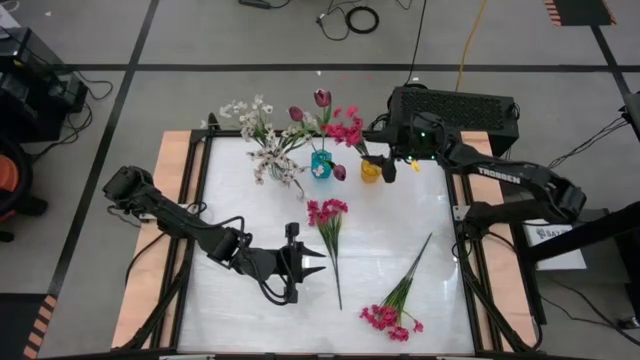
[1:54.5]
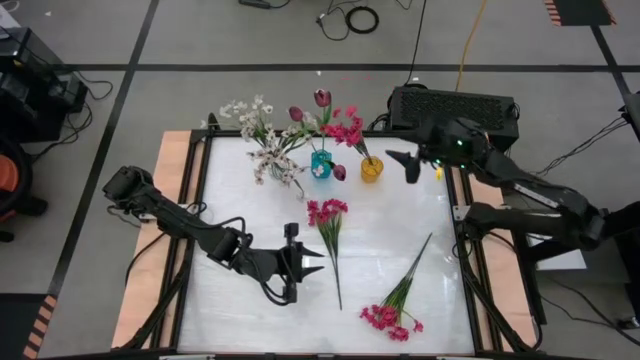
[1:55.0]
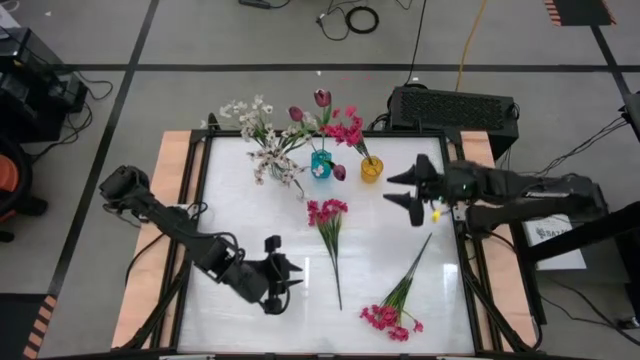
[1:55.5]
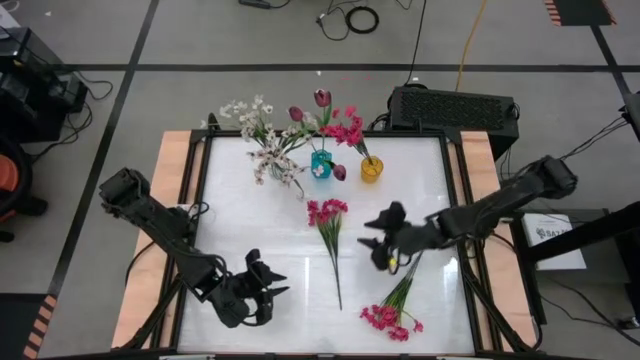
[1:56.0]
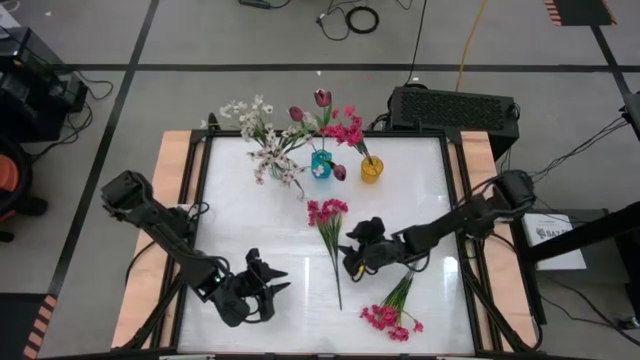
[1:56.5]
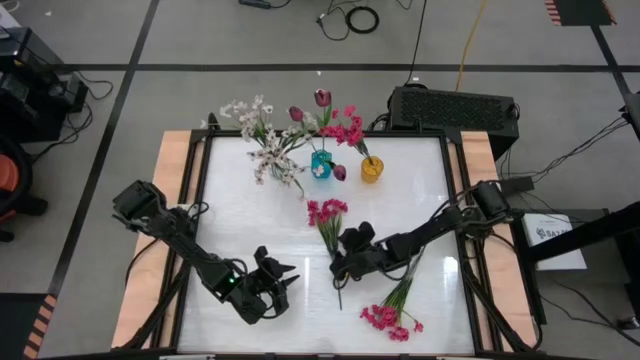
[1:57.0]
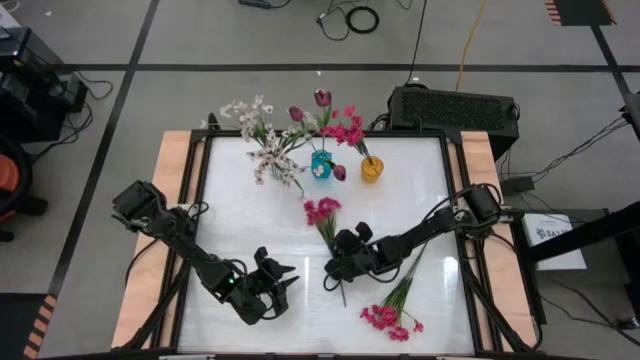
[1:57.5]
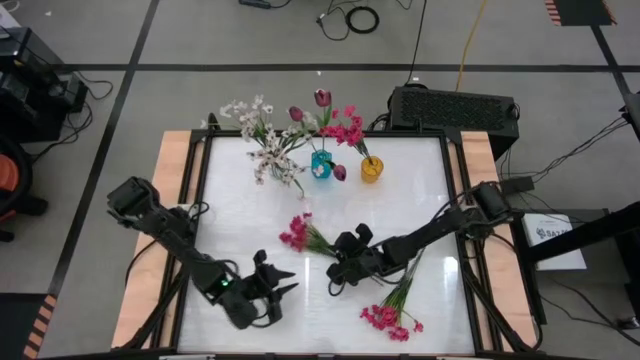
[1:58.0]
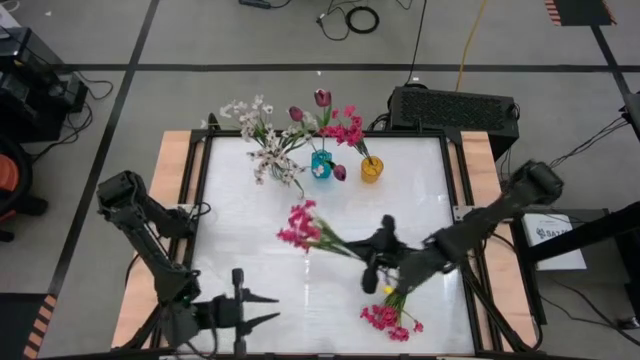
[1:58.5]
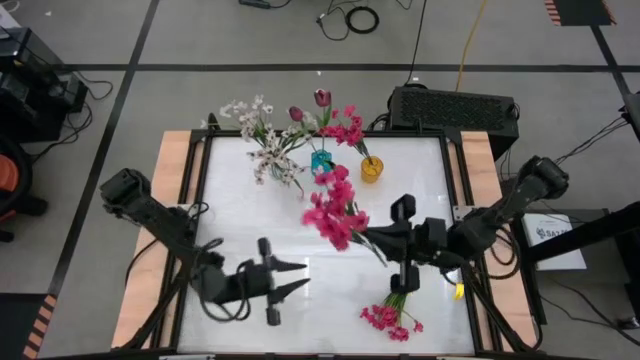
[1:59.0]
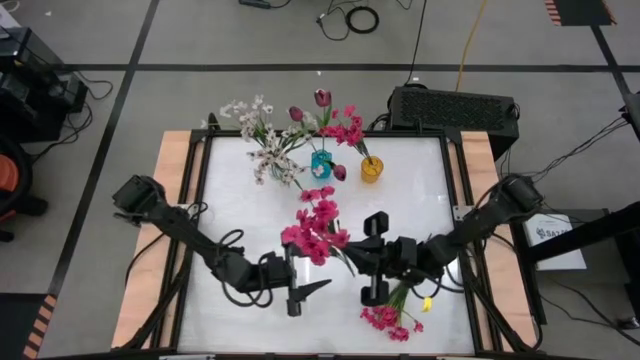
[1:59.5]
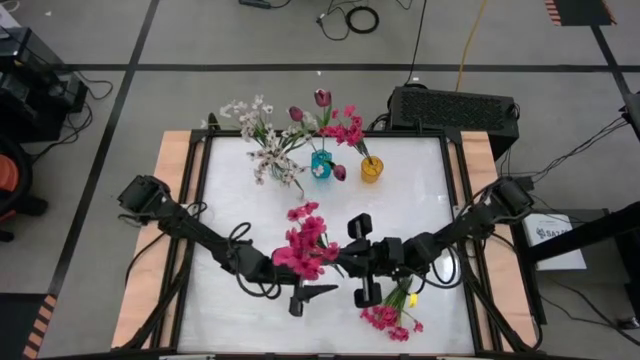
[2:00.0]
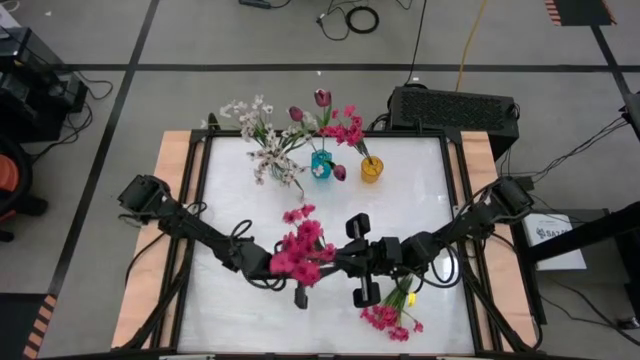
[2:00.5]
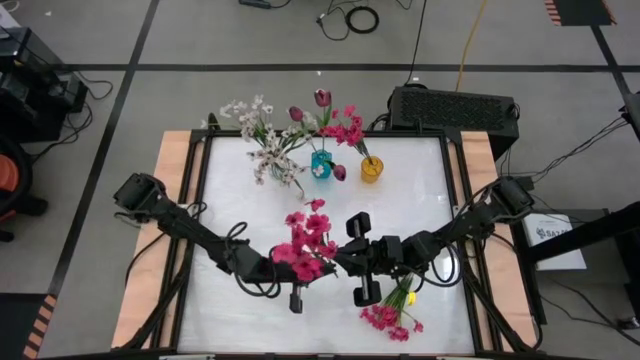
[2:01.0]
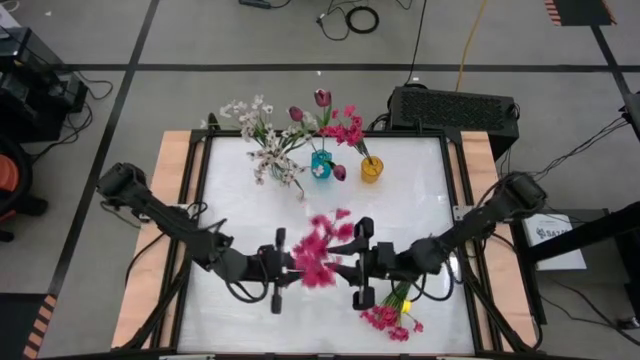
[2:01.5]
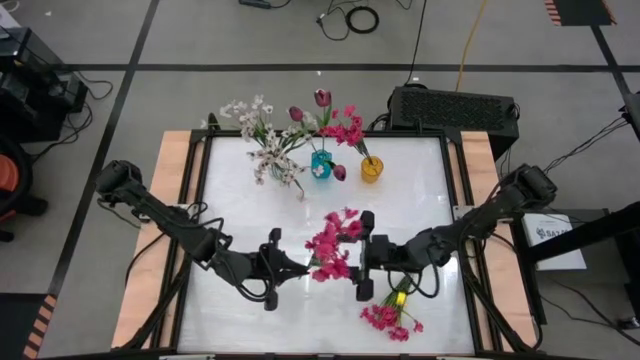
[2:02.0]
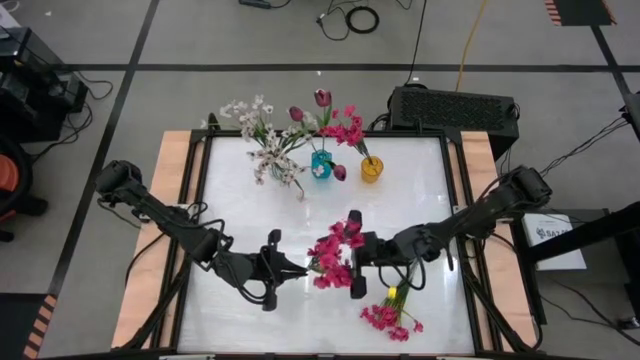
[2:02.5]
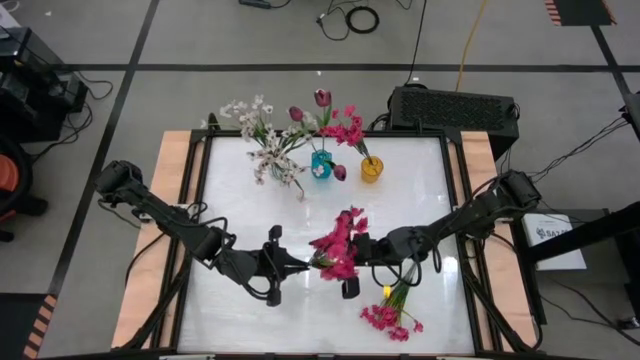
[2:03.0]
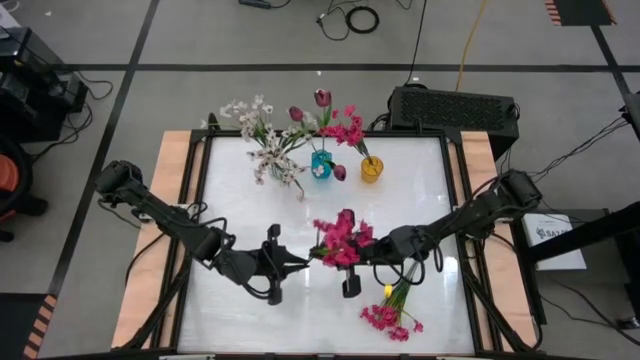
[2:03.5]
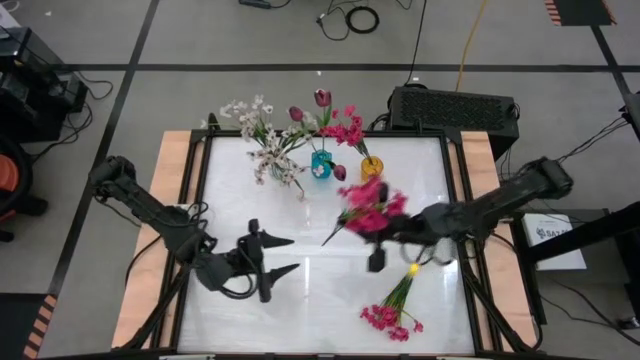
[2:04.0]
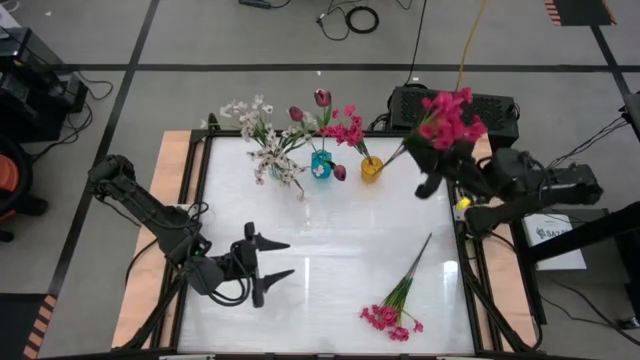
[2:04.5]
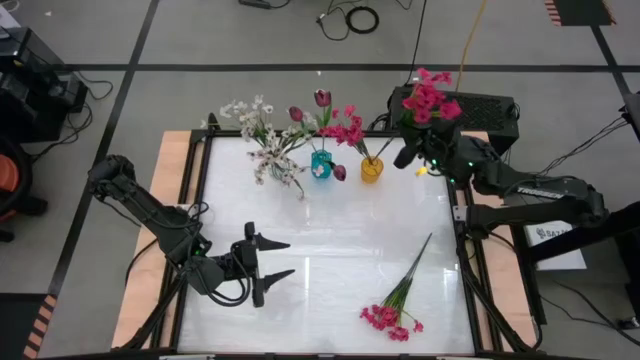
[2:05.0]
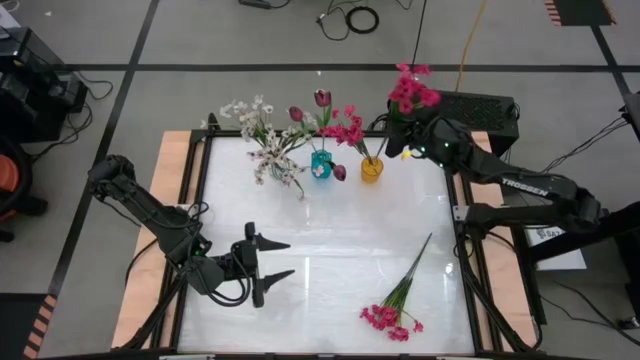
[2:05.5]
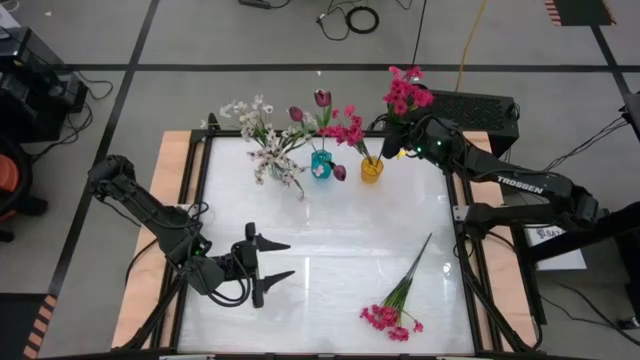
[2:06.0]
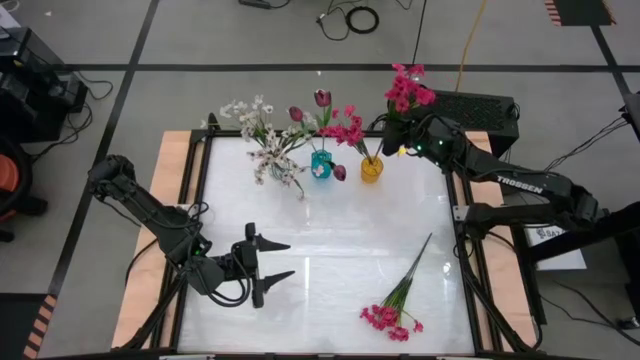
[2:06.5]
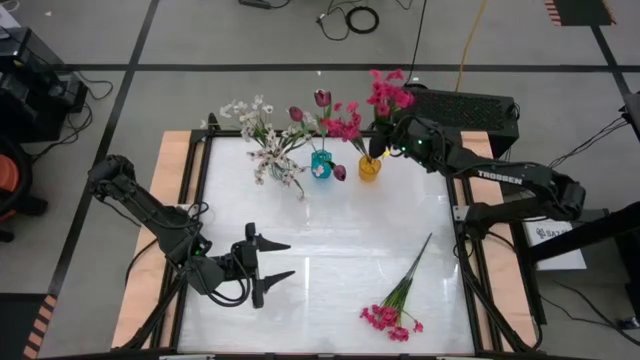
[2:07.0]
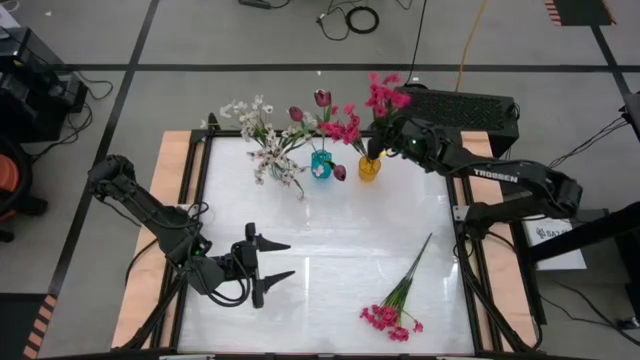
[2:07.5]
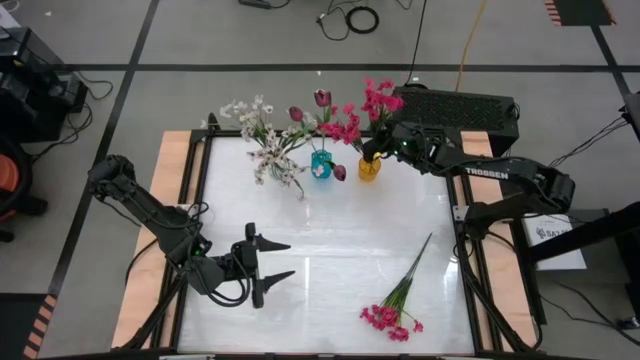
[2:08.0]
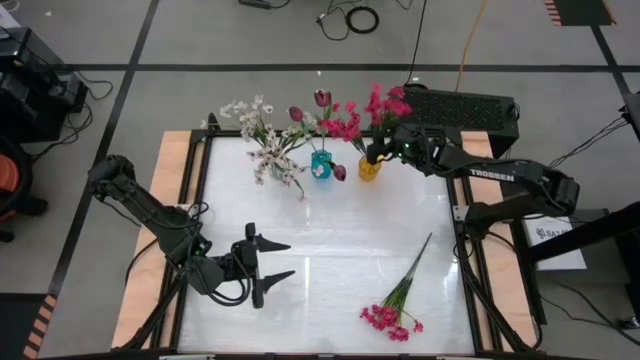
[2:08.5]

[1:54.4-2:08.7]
Task: Sort flowers into vase by color
Put the top pink flowers into the yellow vase

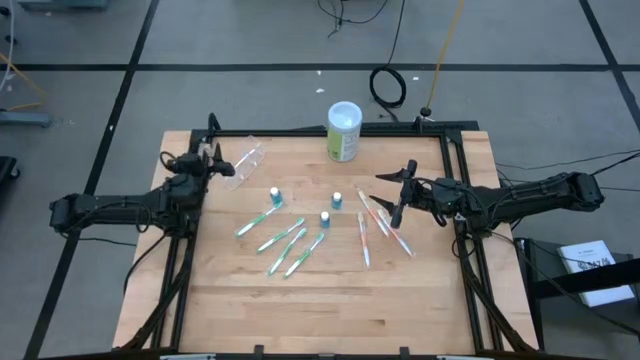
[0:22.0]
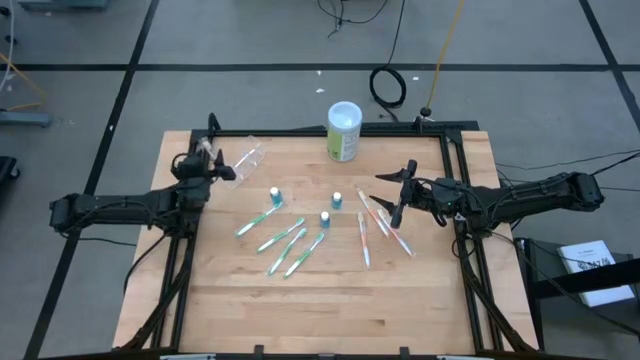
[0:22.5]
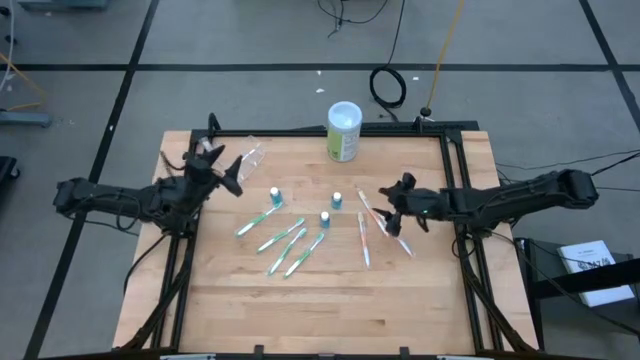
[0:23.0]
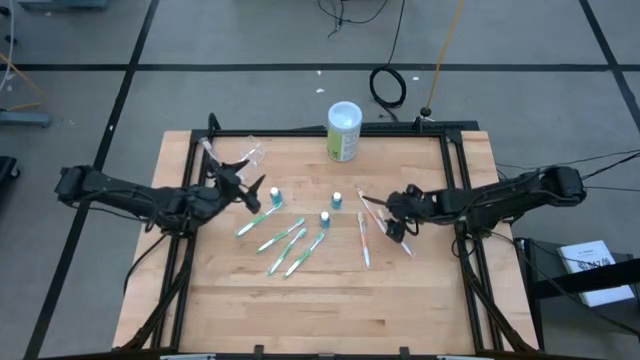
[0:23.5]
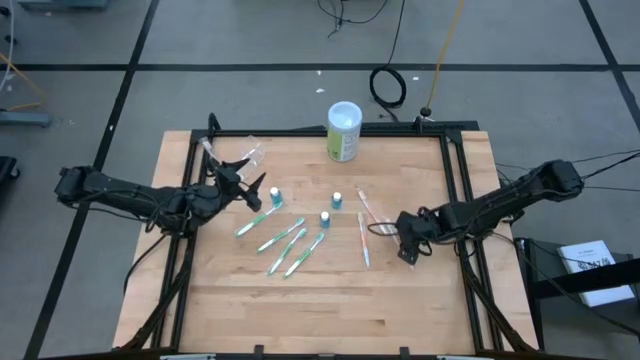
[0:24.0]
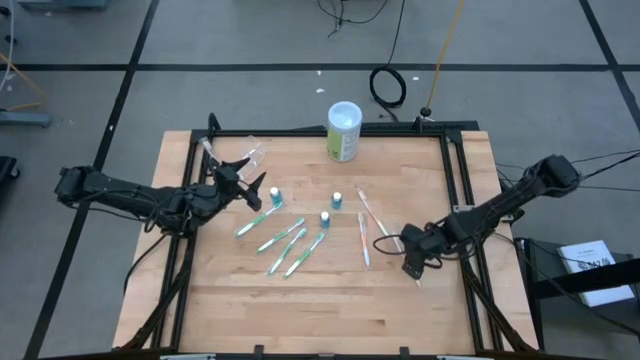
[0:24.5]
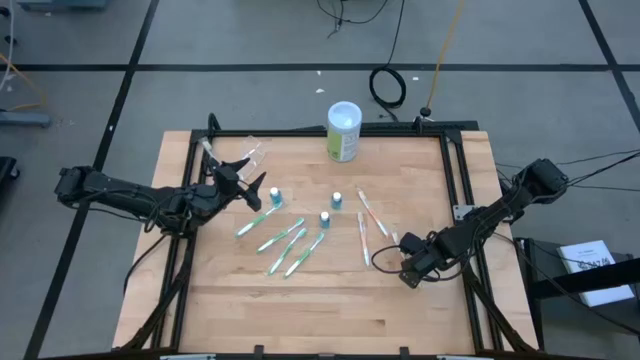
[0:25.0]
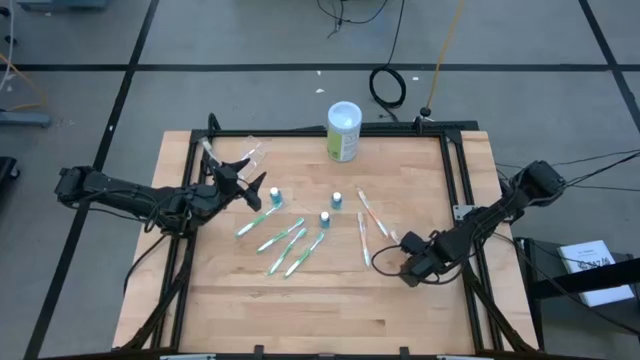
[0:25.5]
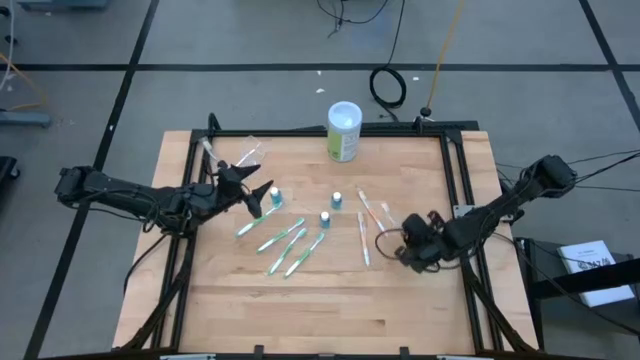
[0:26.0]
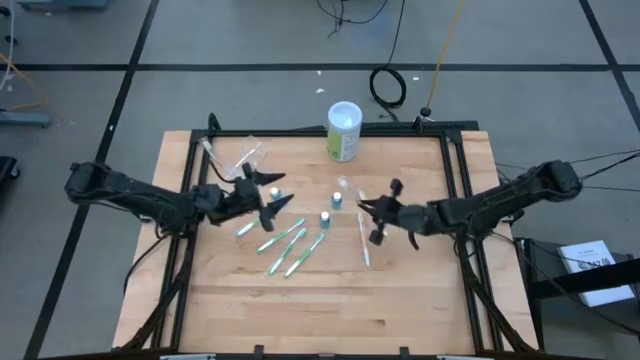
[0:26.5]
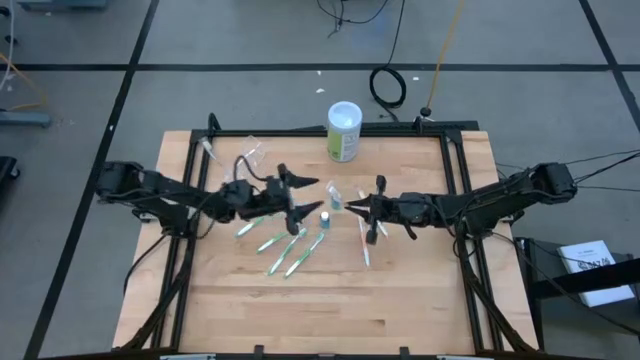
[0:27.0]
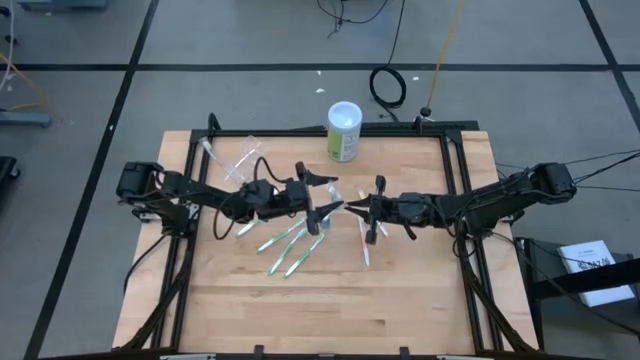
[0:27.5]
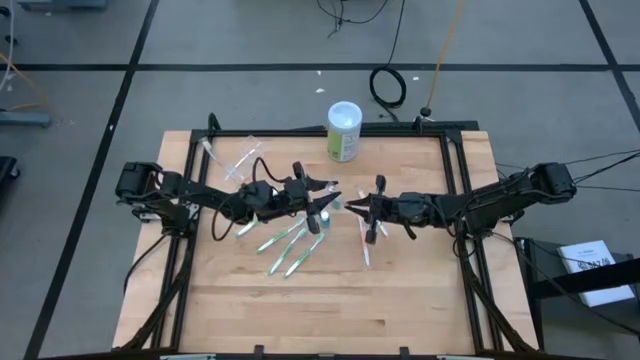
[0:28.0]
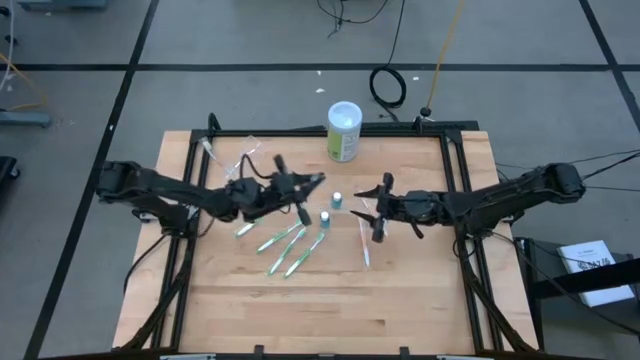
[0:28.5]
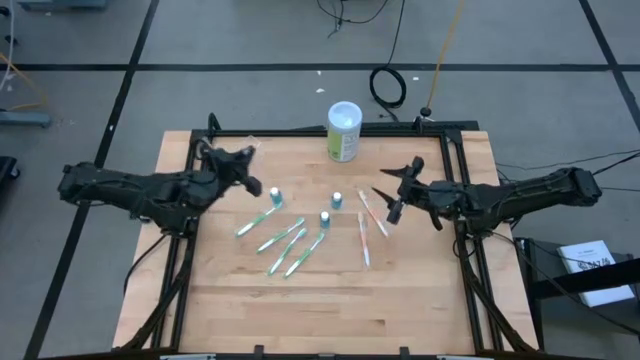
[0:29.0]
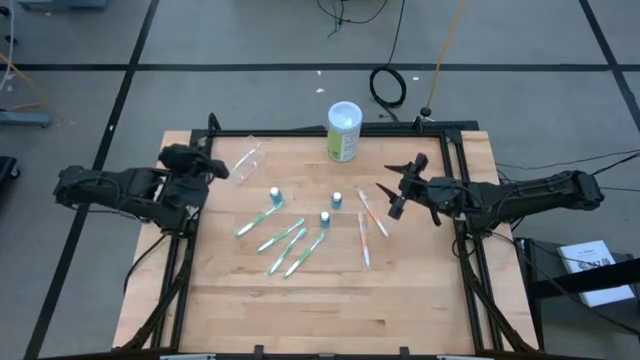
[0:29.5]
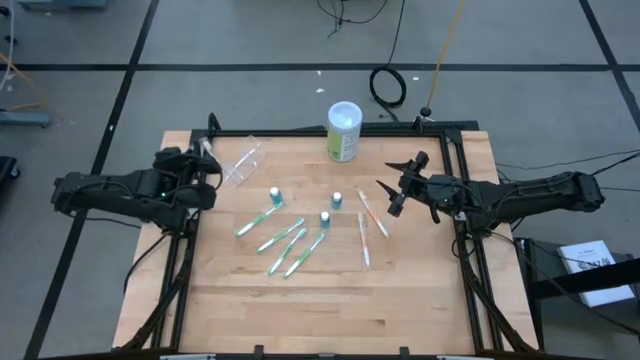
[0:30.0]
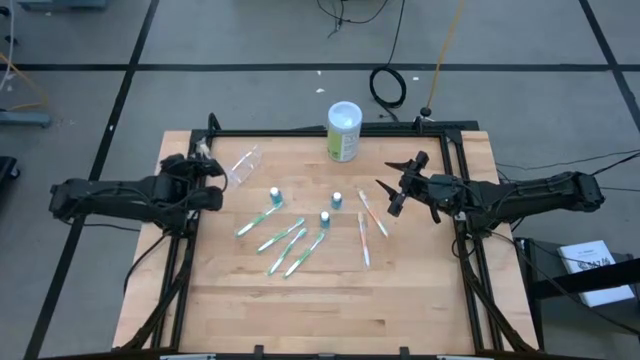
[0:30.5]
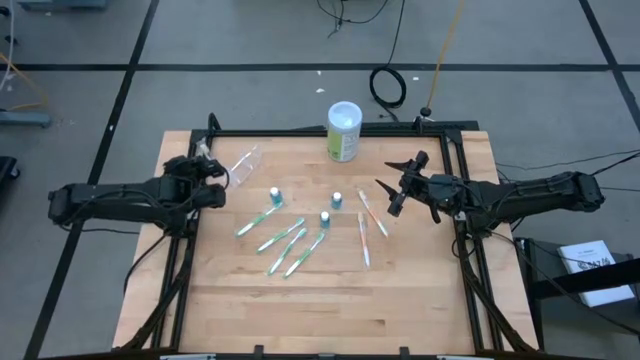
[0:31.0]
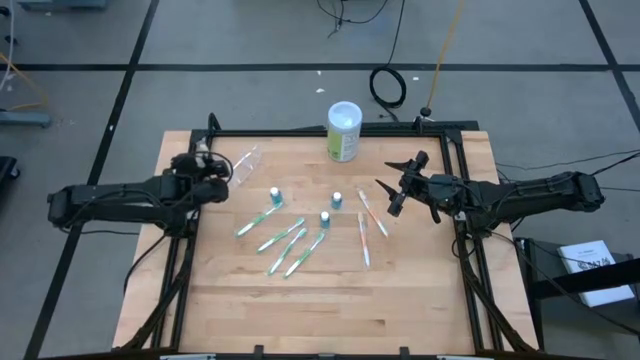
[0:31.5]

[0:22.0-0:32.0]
Task: Pick & Place toothbrushing station
Put the orange toothbrush into the left section of the transparent organizer
